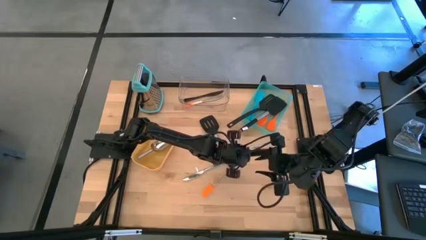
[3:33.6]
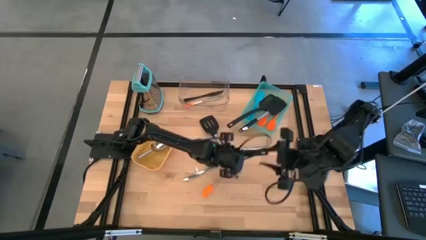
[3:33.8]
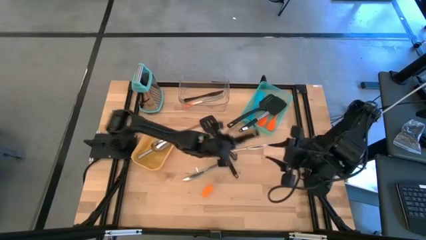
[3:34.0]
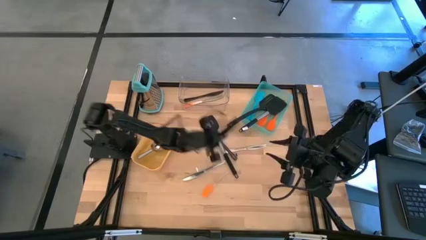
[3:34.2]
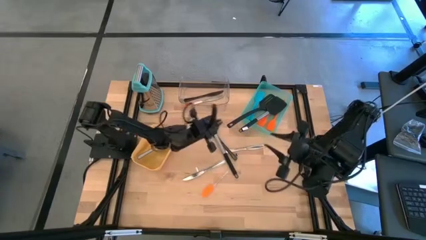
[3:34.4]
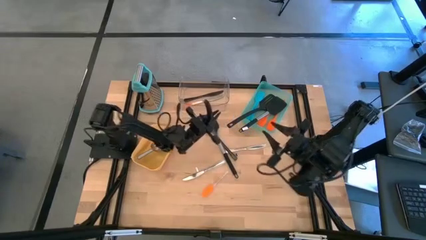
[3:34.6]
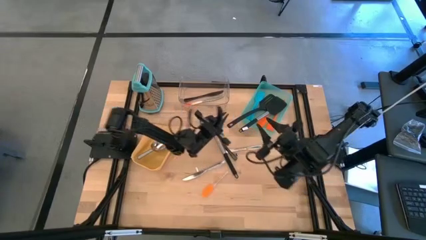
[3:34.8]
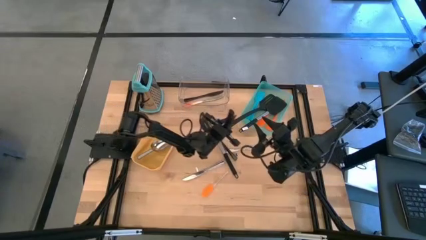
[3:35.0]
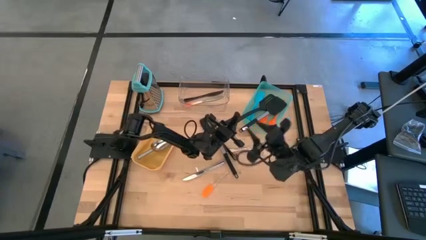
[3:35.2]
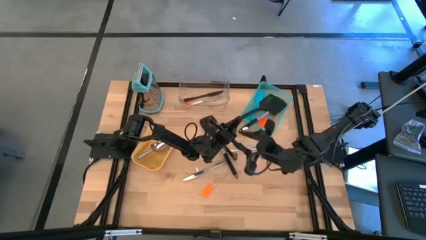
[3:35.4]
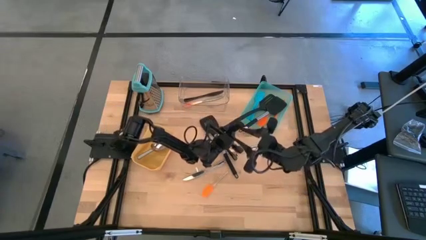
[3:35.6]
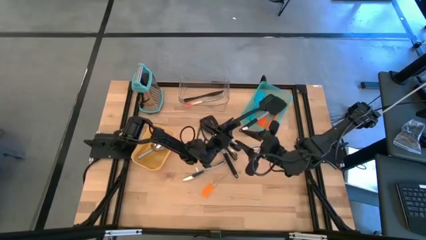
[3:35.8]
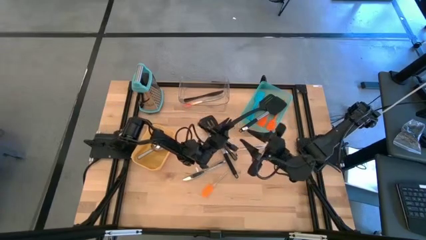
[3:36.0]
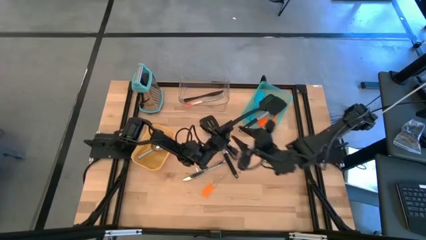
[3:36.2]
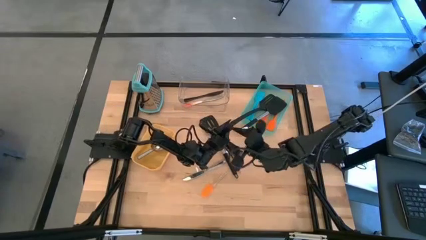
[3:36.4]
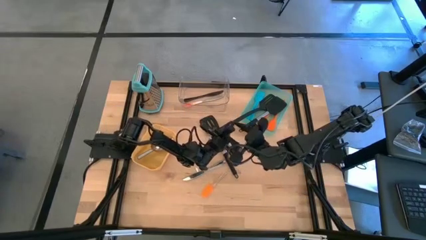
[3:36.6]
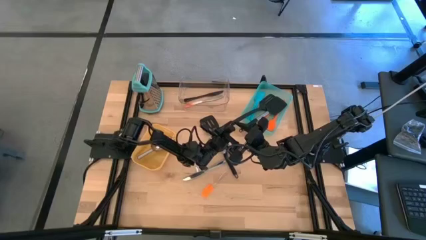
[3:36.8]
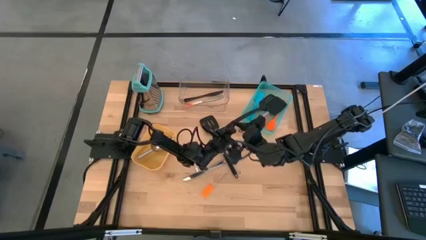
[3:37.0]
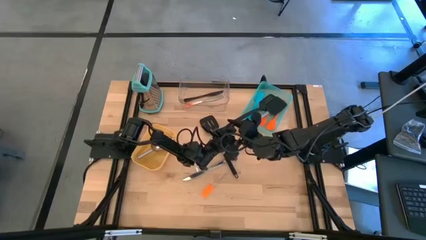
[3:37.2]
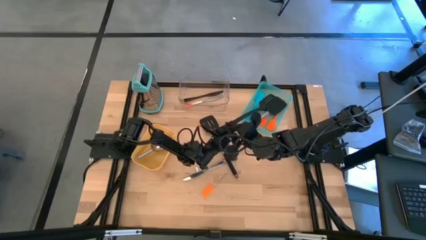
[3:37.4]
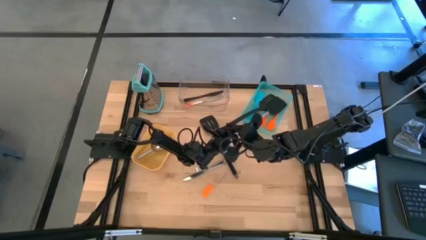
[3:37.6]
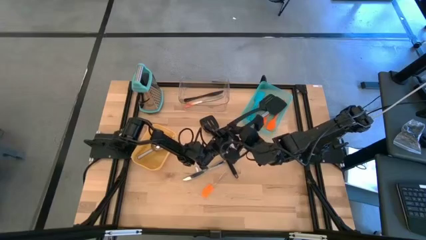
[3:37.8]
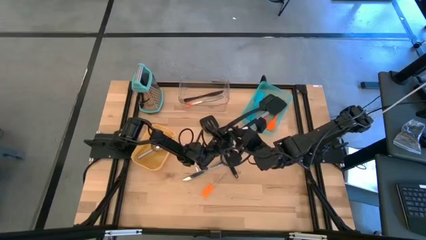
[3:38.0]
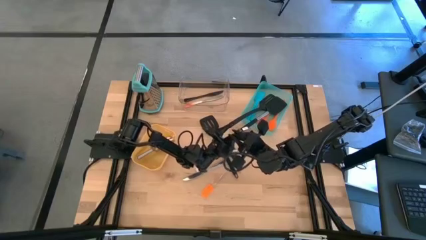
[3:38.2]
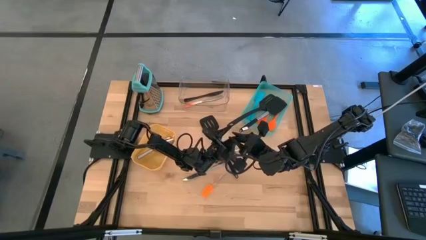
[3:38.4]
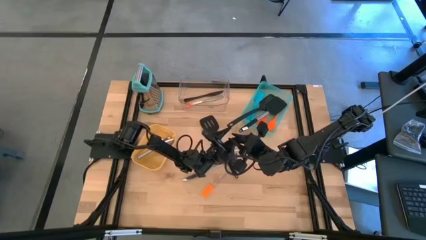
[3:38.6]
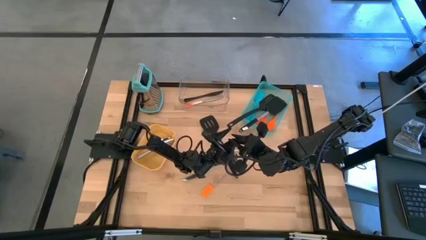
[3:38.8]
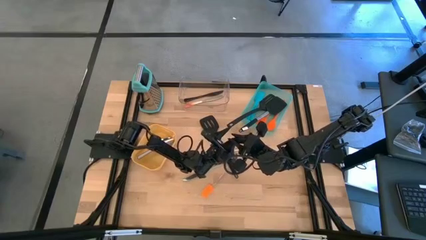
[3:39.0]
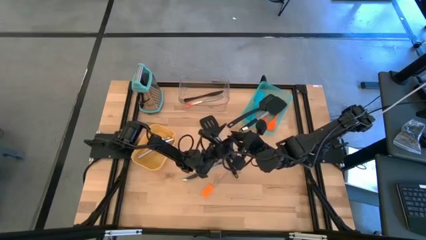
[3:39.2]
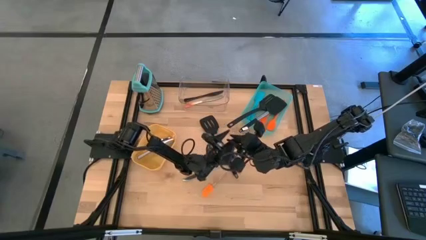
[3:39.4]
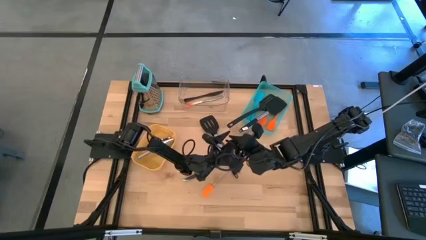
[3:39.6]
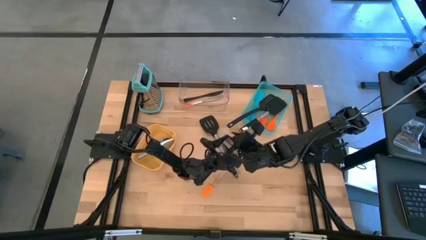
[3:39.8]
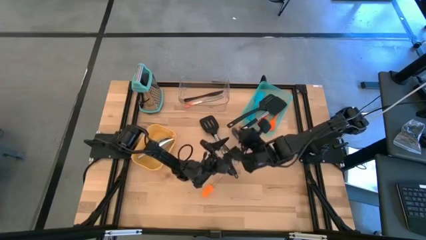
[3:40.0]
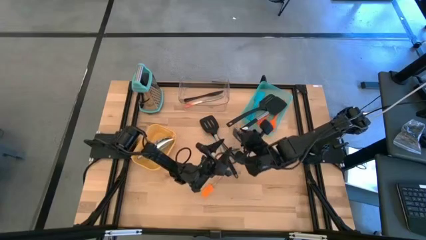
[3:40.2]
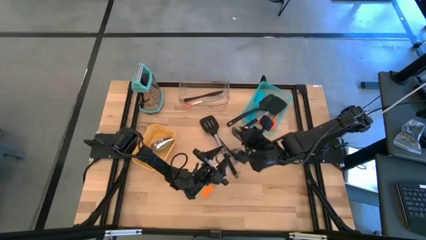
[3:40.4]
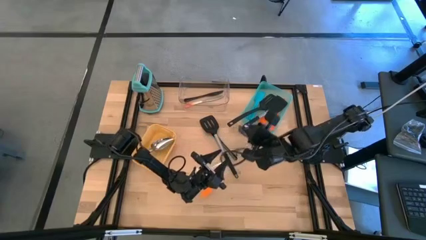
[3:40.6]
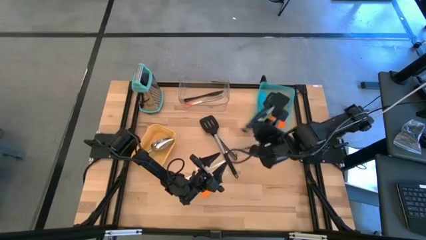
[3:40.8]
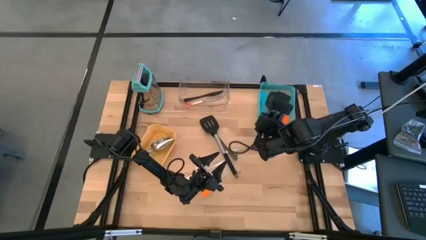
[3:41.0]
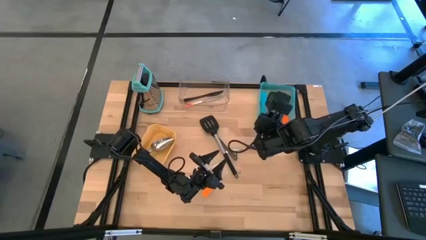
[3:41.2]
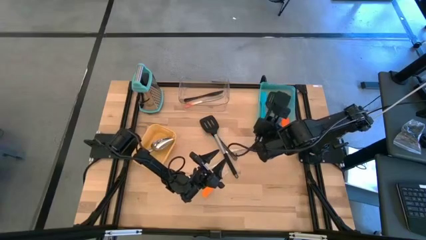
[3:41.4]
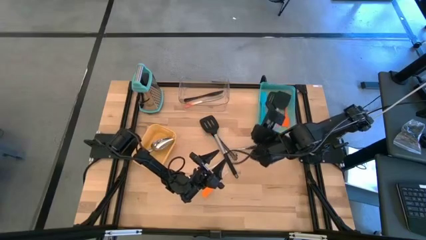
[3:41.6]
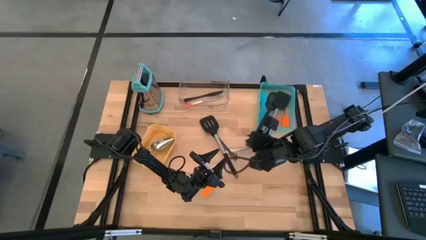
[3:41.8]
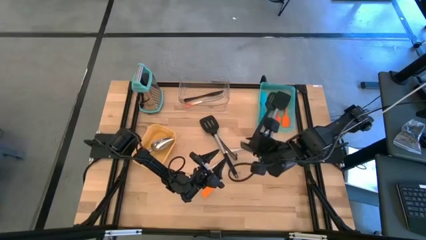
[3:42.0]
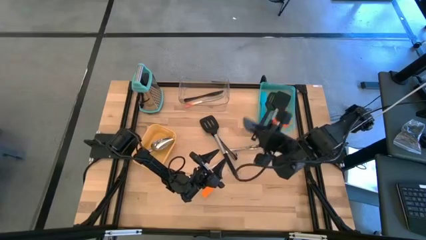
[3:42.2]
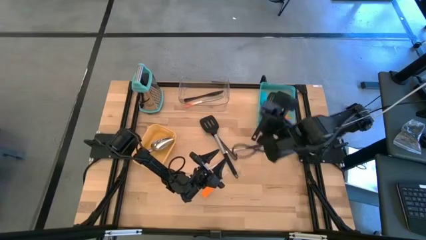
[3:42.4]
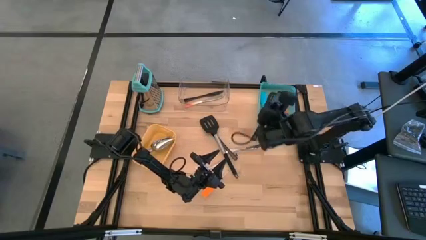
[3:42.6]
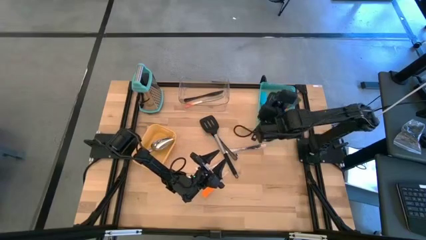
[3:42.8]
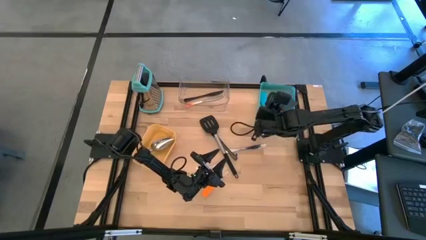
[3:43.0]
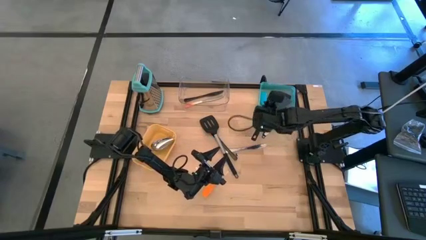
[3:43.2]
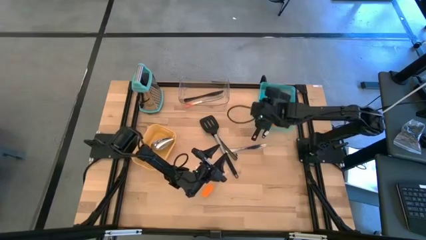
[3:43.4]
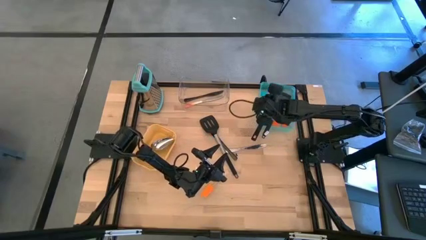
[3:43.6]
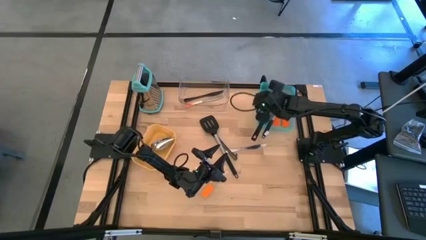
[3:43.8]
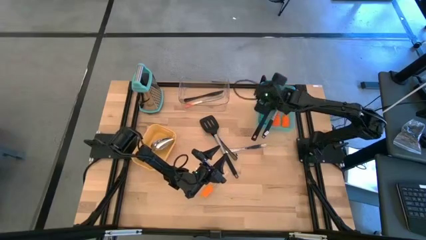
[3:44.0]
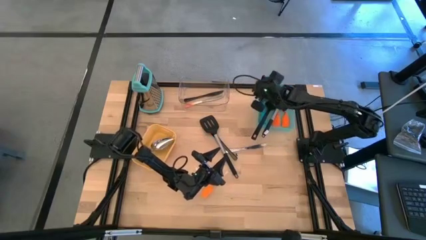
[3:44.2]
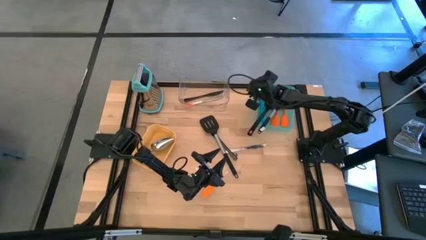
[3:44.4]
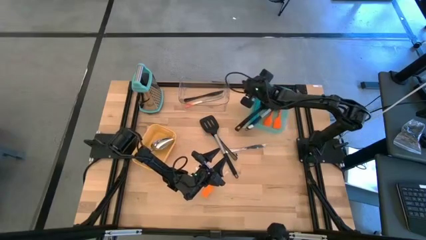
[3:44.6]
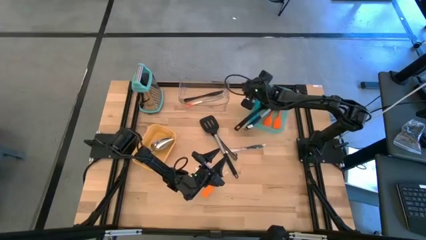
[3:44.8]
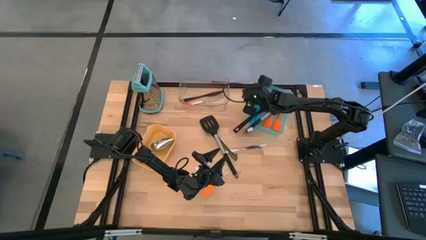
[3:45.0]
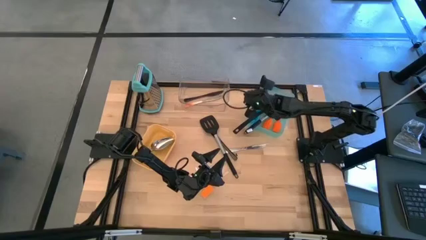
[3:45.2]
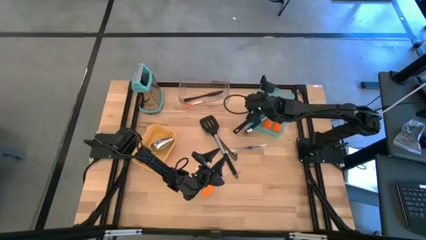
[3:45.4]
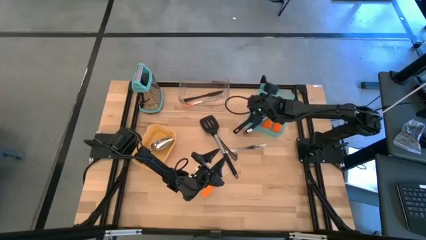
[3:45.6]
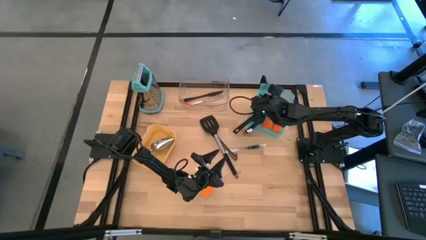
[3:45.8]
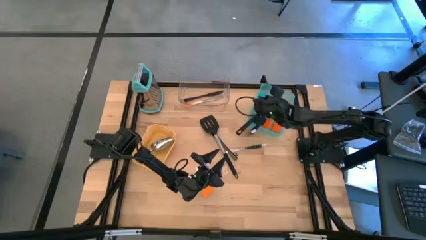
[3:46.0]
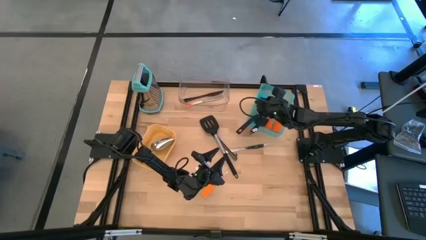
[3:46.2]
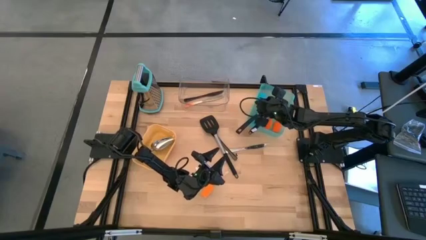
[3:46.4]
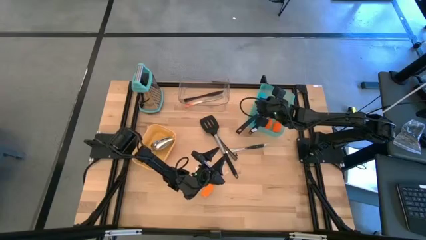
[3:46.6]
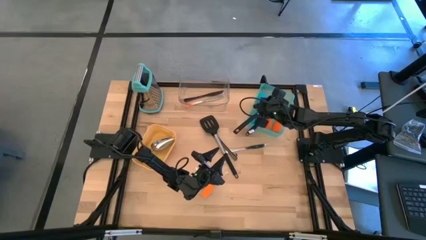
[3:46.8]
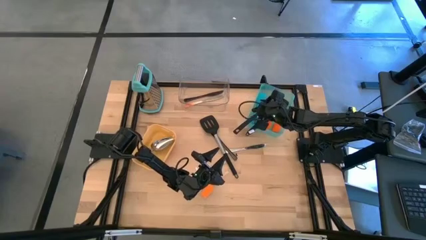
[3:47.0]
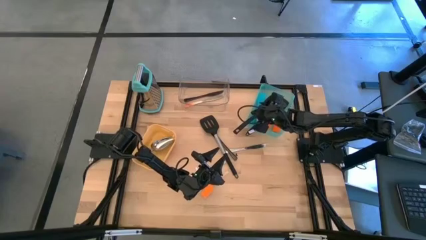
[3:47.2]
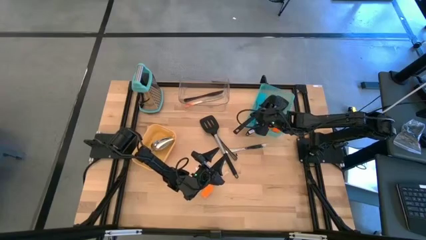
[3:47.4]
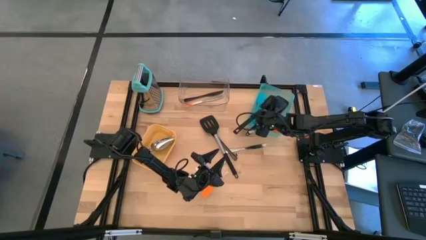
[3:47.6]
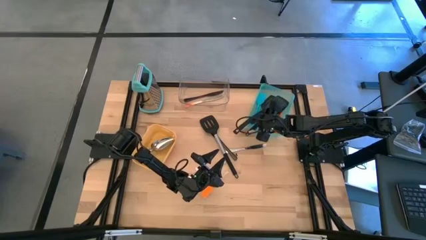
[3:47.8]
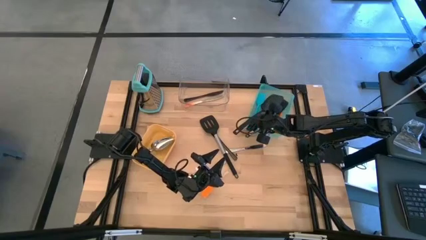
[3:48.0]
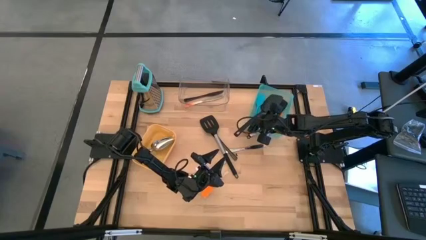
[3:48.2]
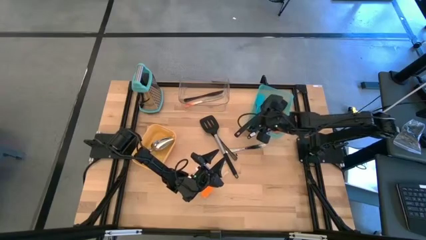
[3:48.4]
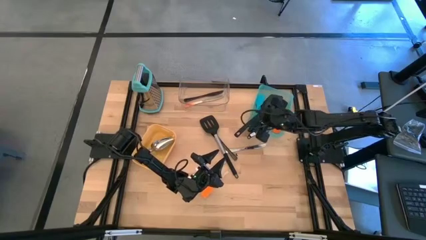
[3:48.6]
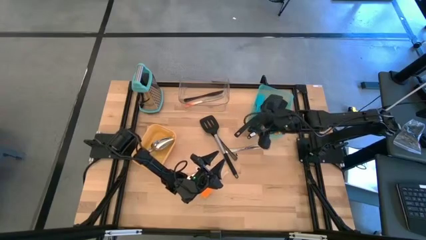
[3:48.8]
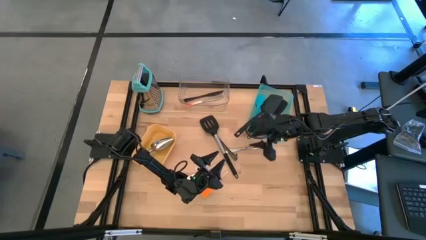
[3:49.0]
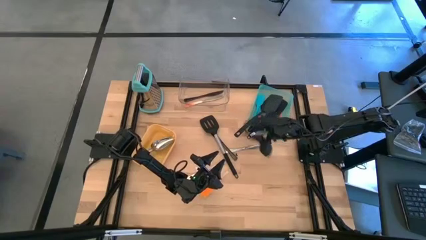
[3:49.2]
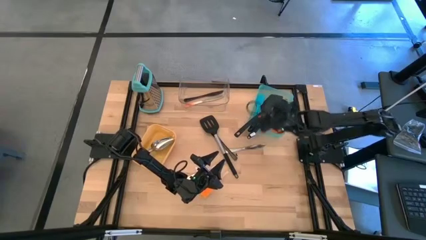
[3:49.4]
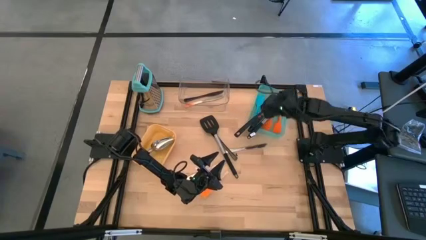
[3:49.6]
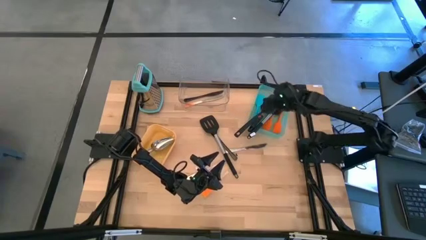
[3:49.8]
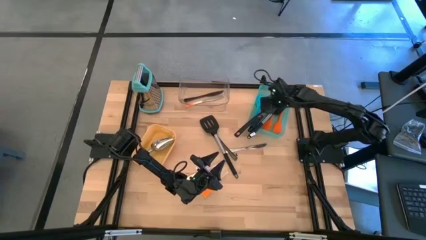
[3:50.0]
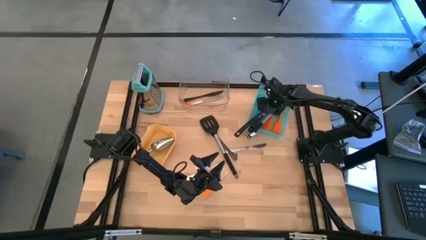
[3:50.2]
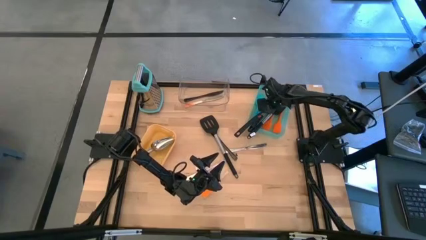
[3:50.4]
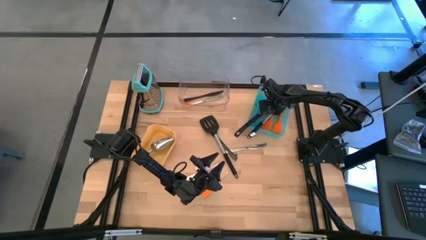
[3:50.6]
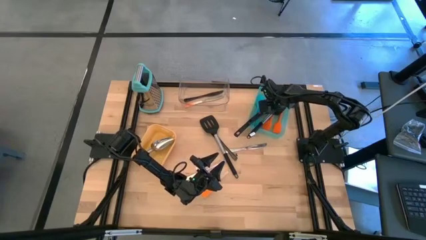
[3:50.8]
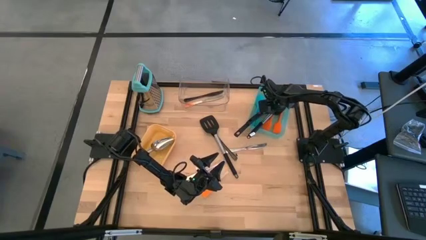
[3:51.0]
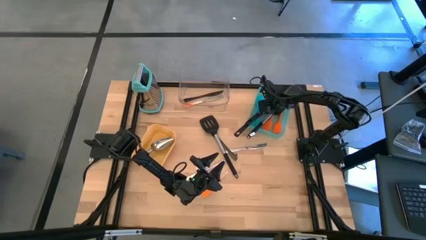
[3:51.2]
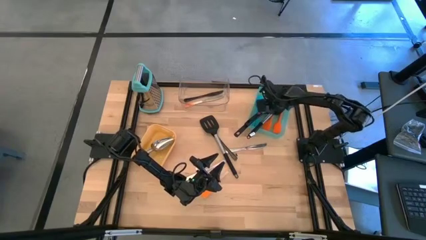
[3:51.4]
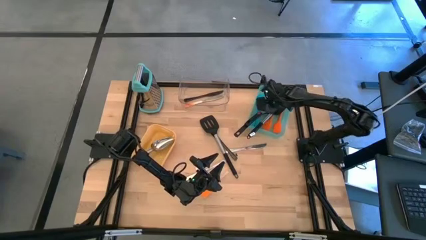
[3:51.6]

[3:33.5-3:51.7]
Task: Pick & Place Kitchen Items
Put the black spatula into the green bin
